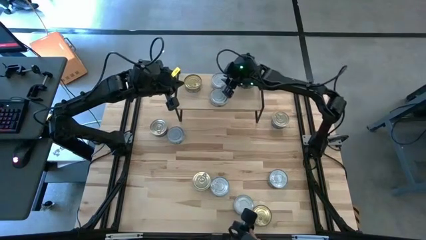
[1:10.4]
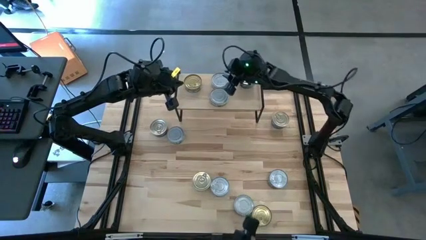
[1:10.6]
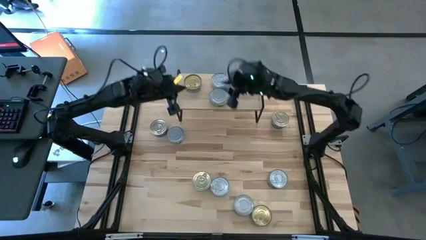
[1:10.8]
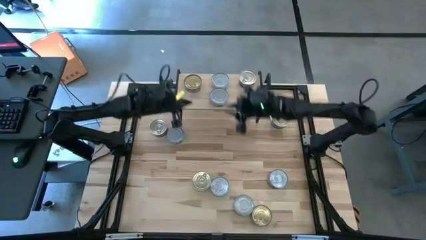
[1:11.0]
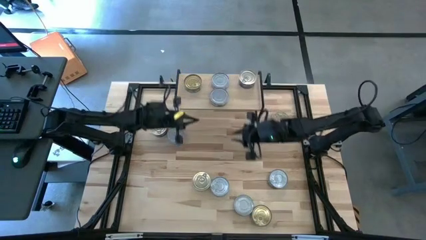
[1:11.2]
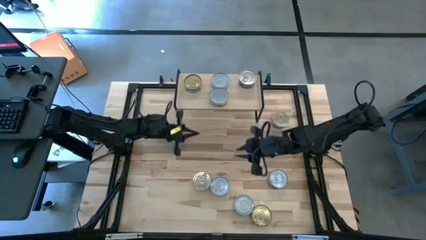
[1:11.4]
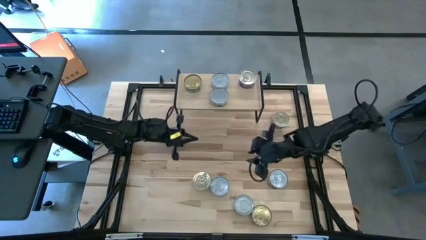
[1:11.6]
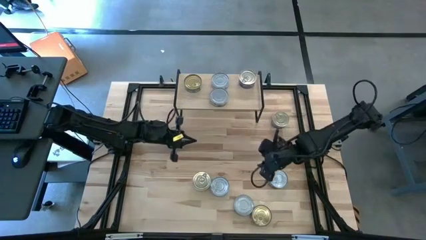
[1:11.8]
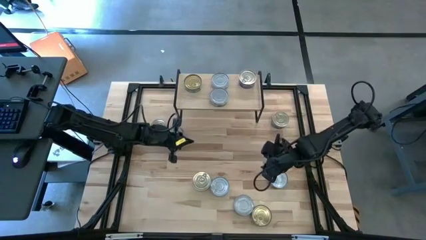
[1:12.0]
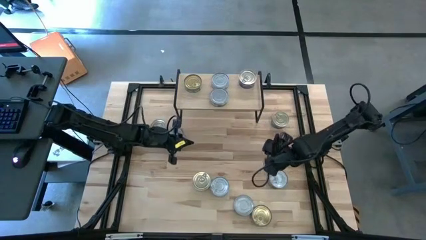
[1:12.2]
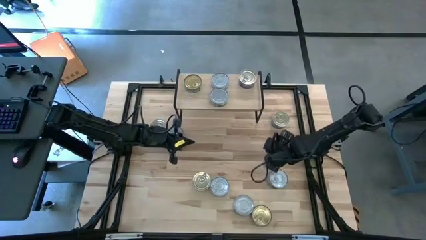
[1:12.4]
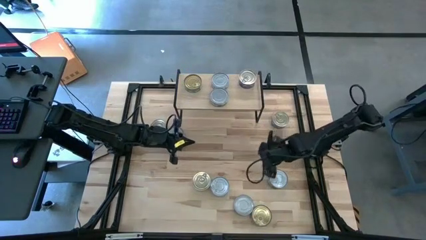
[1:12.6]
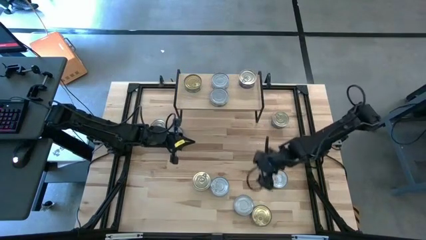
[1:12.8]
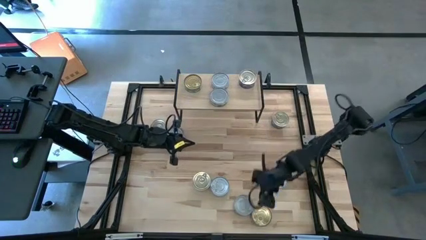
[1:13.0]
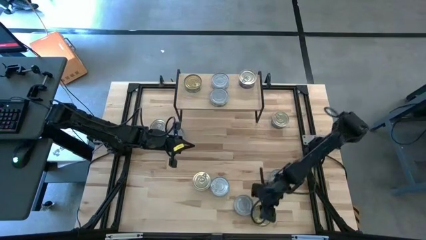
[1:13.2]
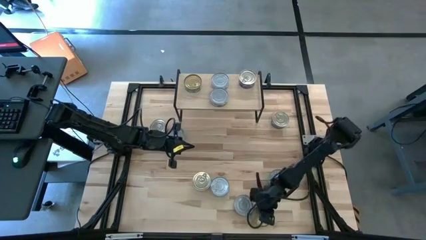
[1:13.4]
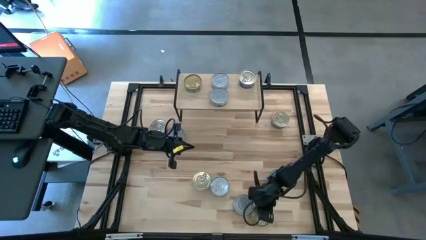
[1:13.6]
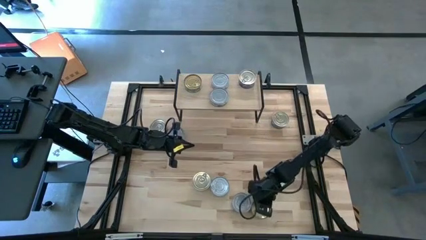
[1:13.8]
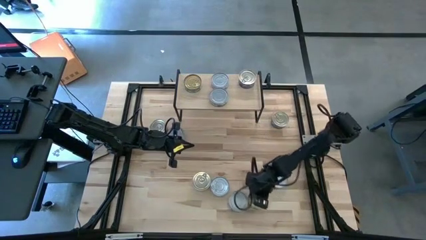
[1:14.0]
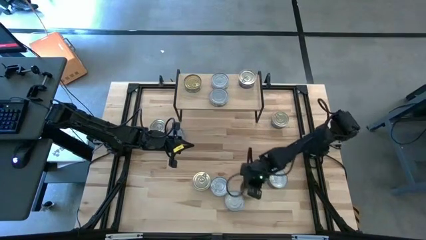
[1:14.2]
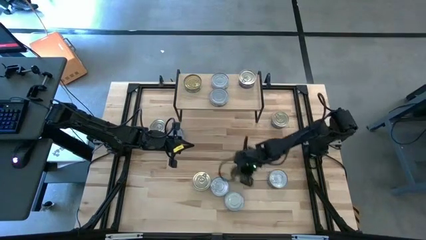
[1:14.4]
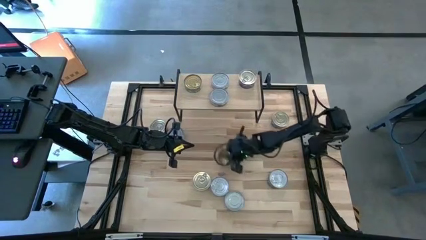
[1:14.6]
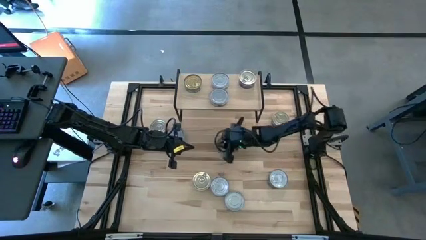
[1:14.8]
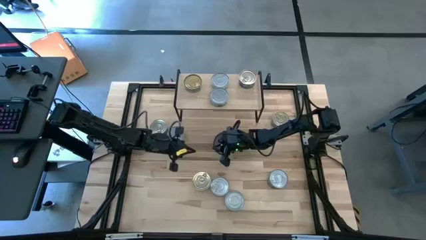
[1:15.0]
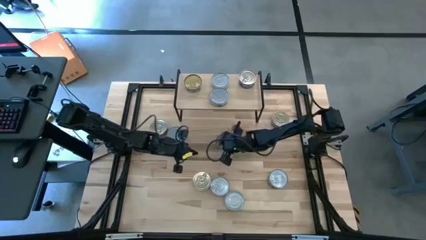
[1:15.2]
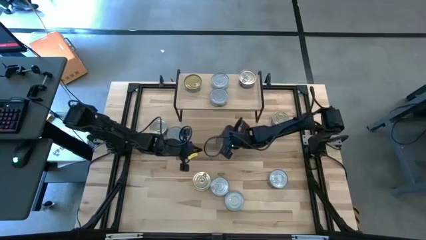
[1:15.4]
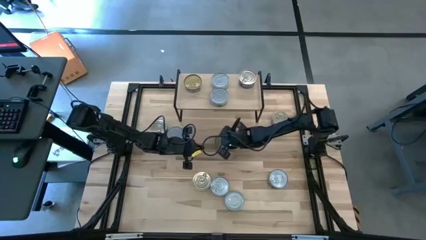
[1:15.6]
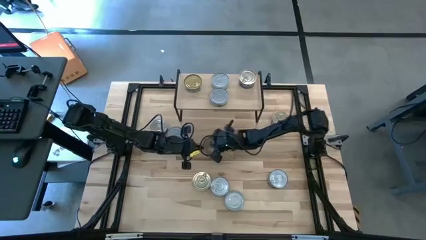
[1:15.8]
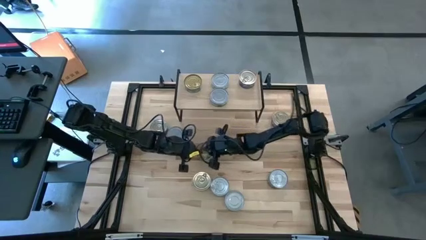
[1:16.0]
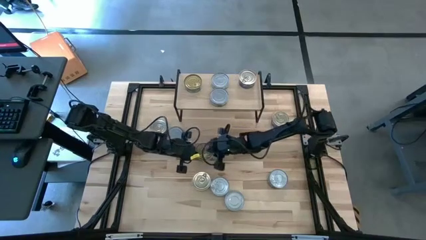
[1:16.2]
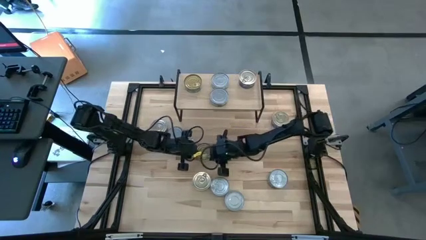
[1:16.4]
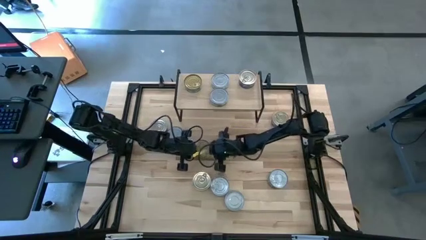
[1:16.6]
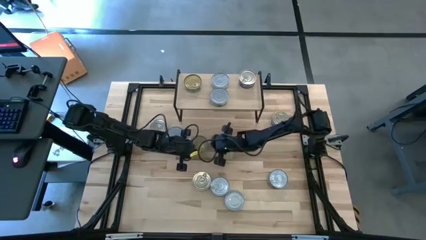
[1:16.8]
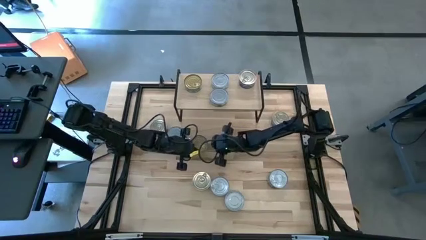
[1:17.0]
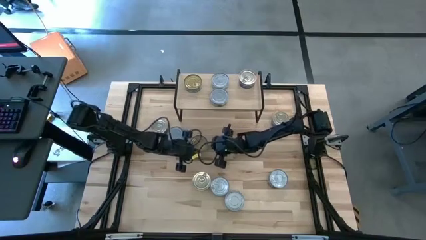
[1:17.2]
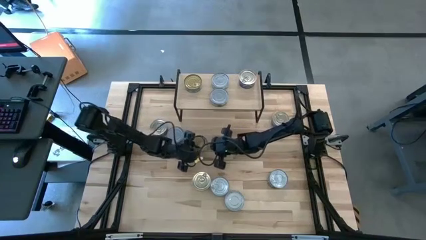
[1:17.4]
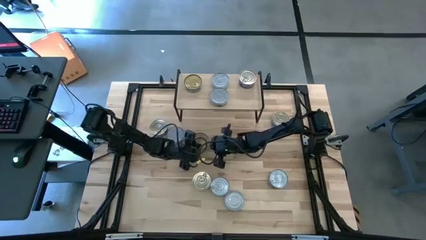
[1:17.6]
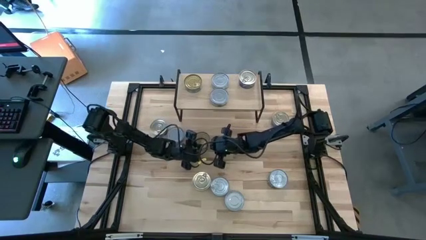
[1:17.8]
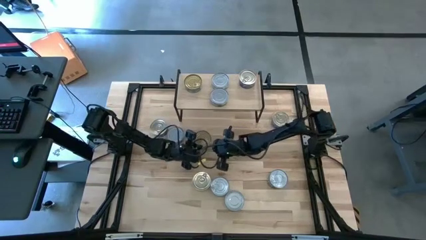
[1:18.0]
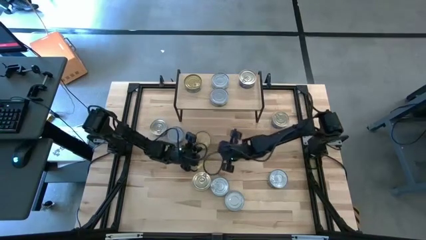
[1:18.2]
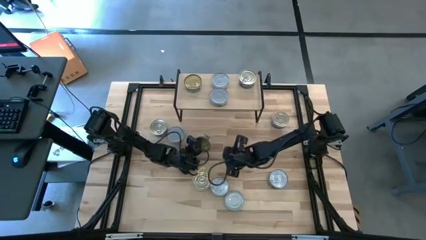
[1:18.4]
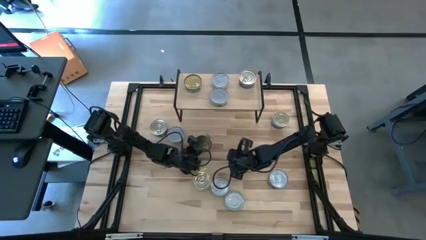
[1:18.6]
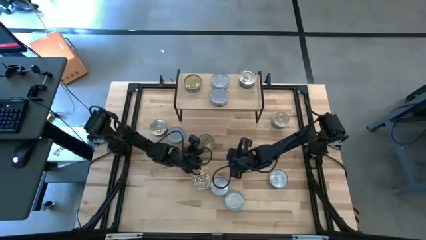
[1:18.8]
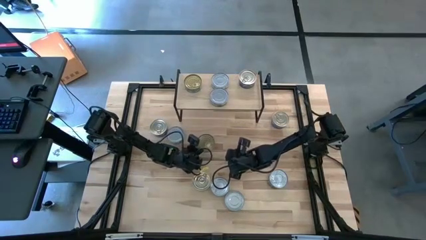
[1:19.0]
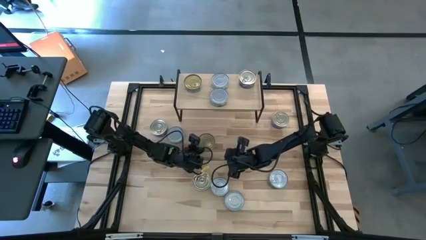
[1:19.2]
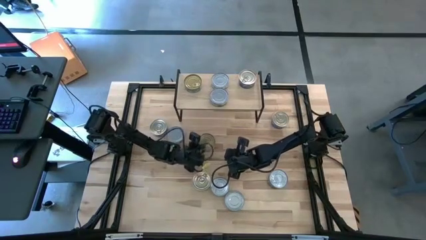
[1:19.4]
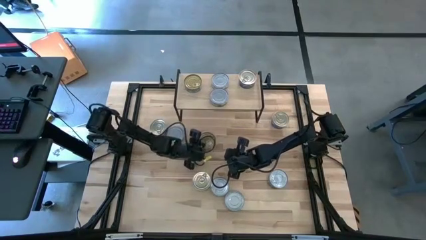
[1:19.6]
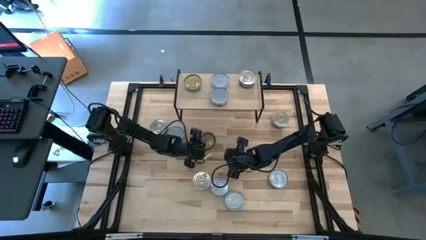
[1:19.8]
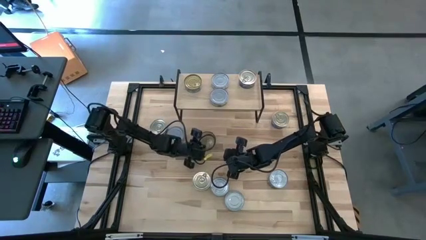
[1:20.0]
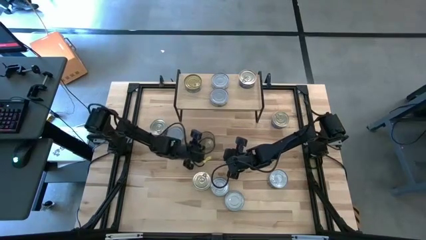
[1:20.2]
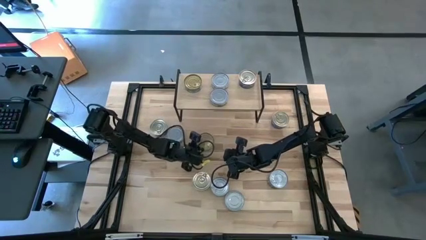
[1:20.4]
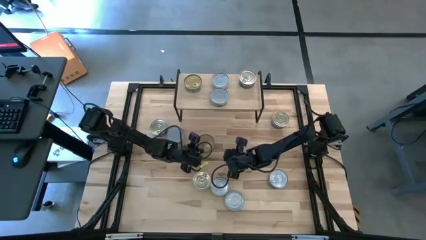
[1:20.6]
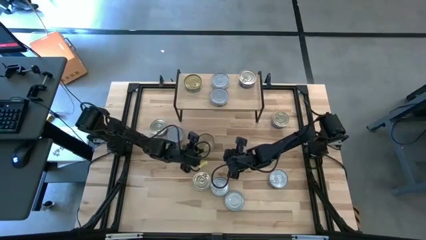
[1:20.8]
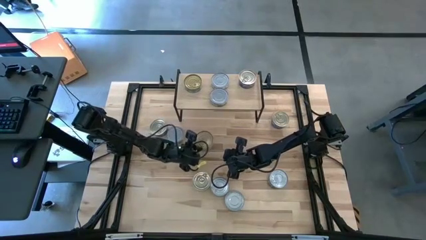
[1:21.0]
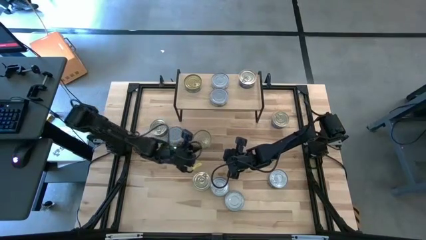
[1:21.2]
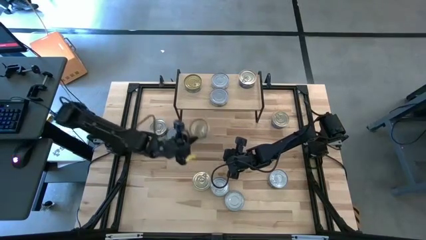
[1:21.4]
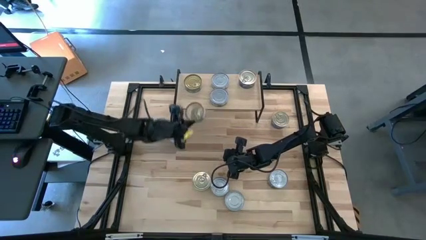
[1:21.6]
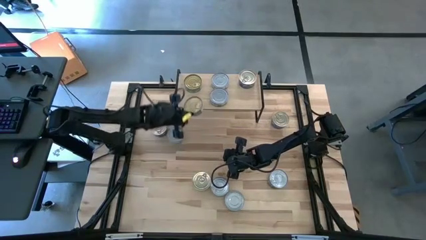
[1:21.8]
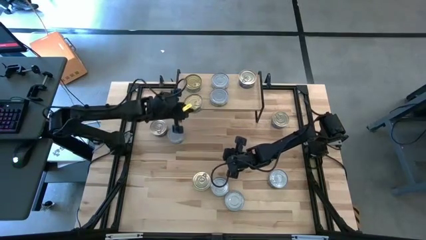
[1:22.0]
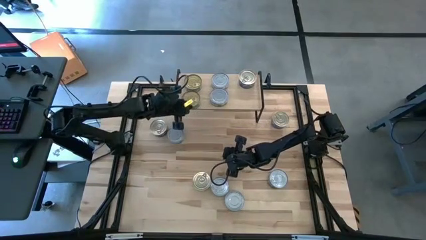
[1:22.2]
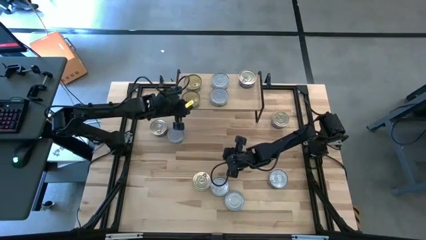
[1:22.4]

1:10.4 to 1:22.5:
Task: Stack canned seafood by type on shelf
Put the bottom green tuna can on the shelf aligned with the other green tuna can

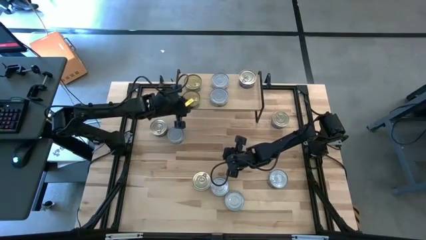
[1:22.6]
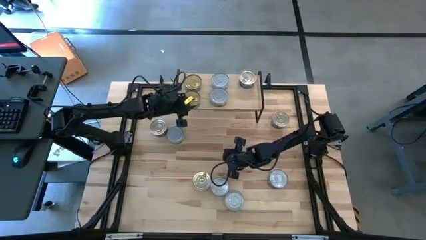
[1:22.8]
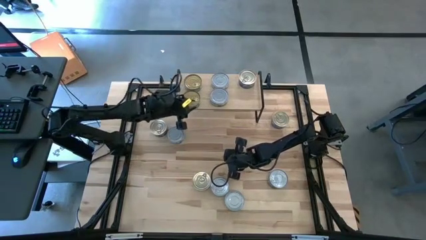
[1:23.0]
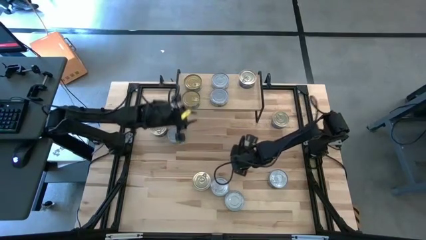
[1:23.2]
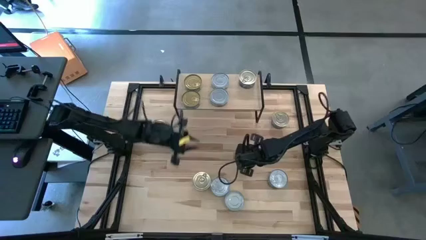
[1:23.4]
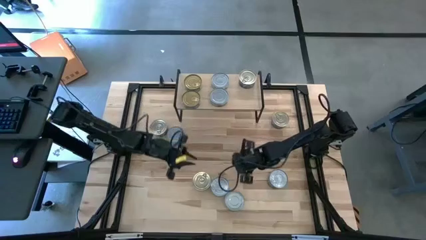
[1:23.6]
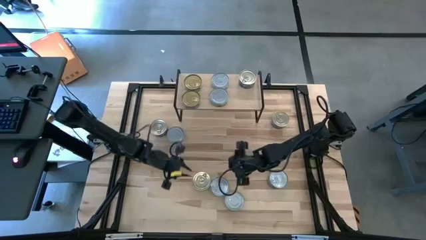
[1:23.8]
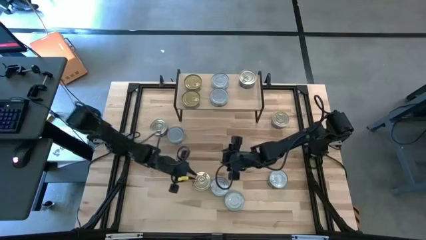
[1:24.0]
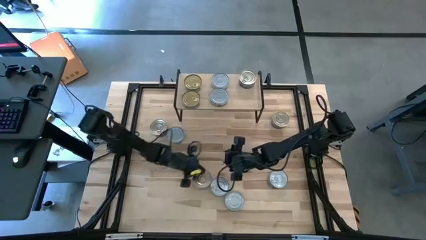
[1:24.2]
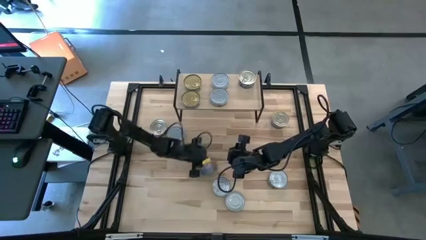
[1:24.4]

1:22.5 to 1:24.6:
Put the bottom blue tuna can on the shelf aligned with the other blue tuna can
